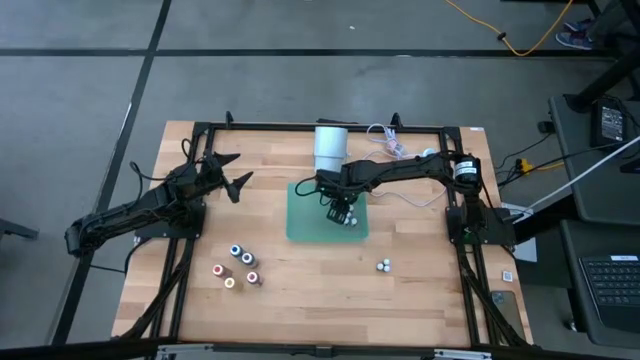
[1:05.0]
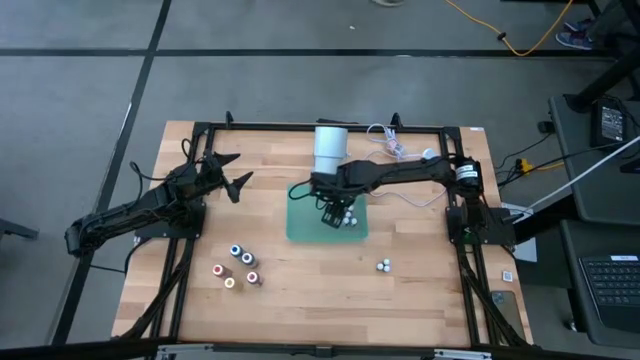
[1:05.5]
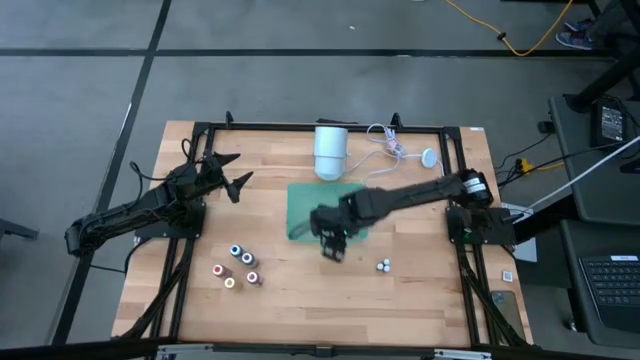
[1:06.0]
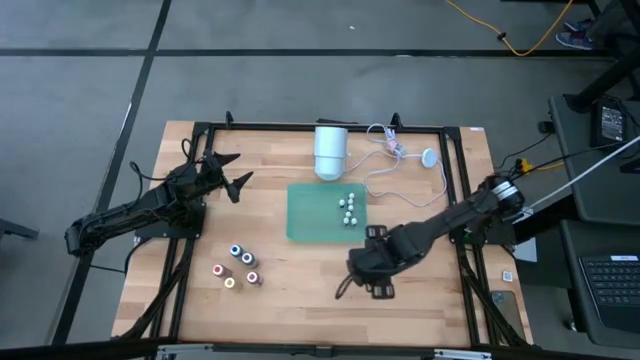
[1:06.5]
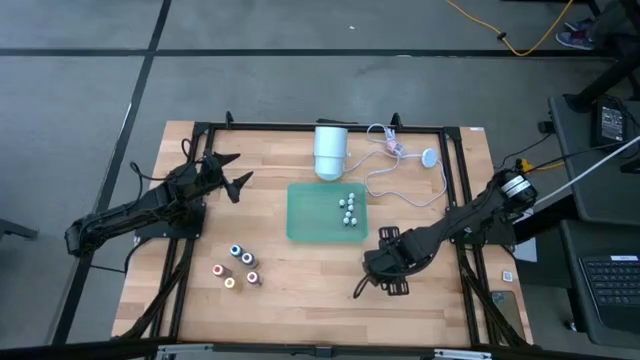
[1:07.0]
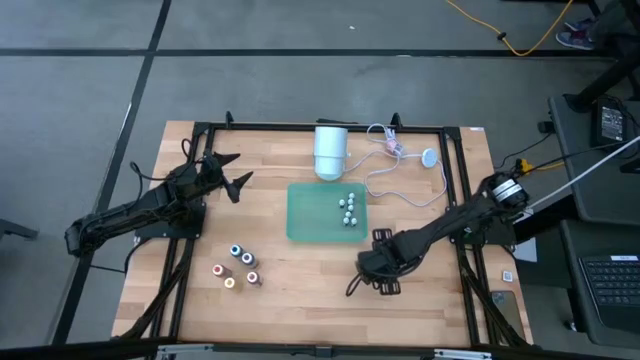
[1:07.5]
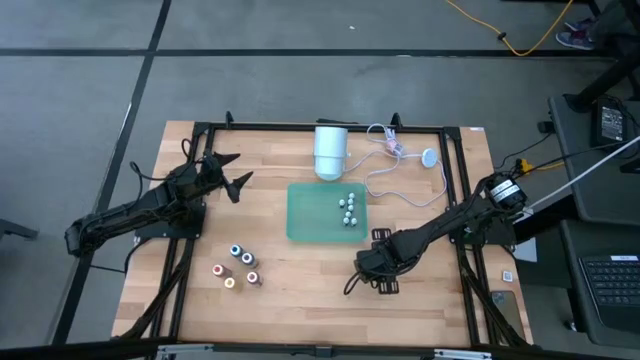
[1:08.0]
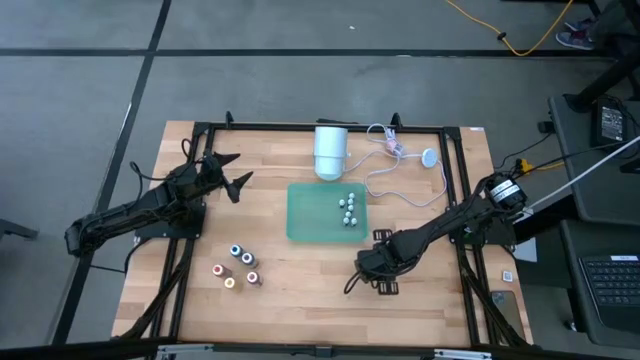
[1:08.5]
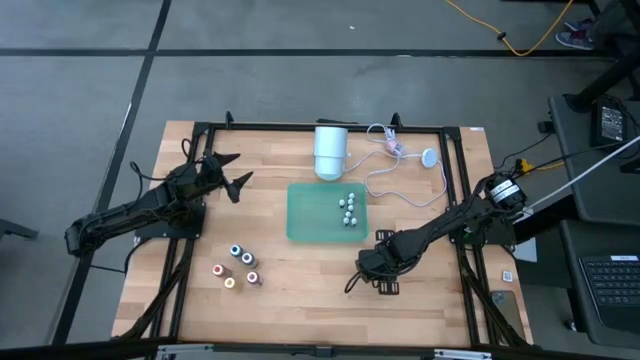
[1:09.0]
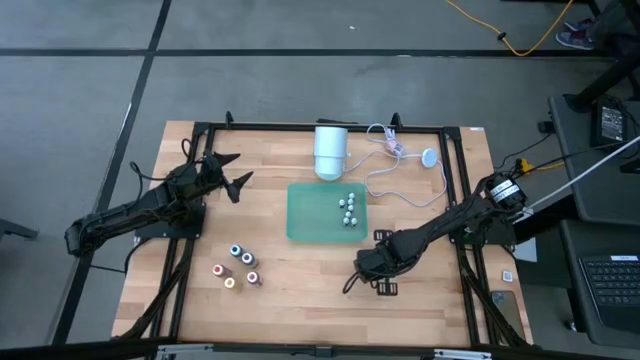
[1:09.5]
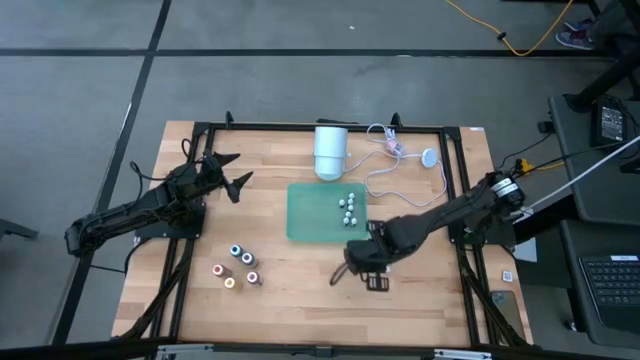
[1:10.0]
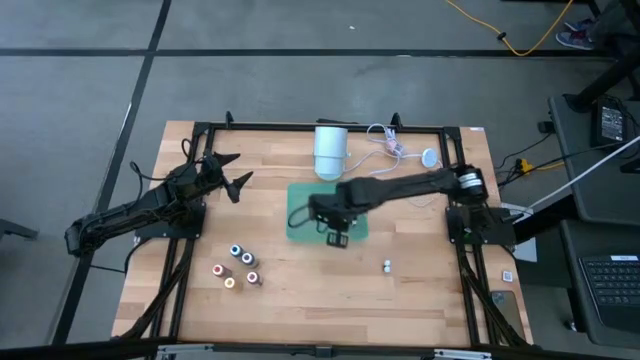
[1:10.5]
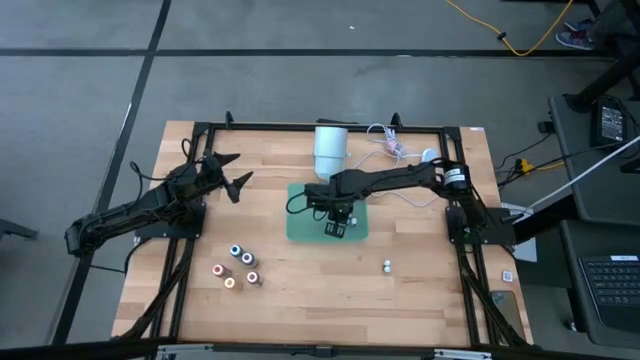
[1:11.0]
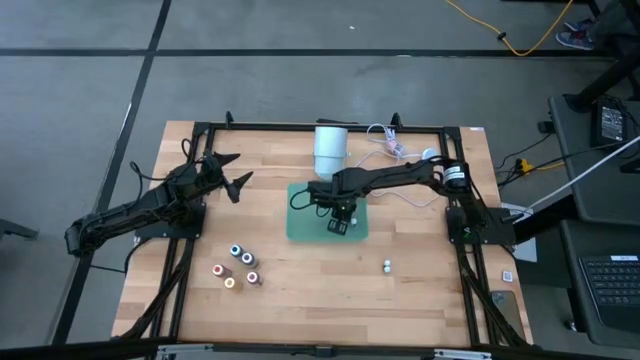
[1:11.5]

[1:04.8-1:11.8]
Task: Pick & Place food coloring
Put the small black food coloring bottle into the green bin

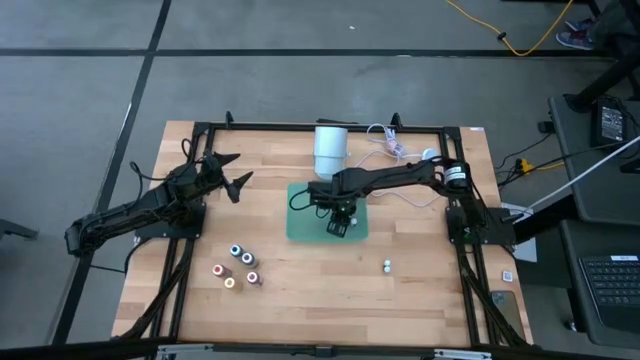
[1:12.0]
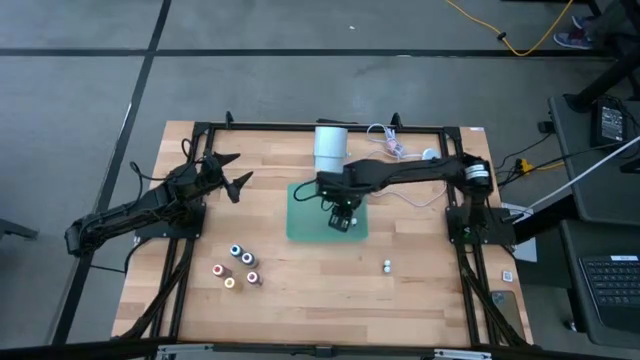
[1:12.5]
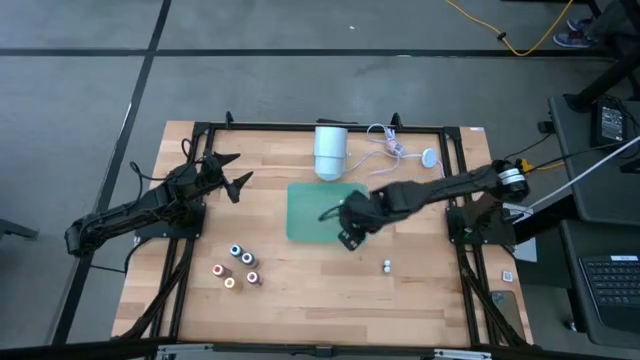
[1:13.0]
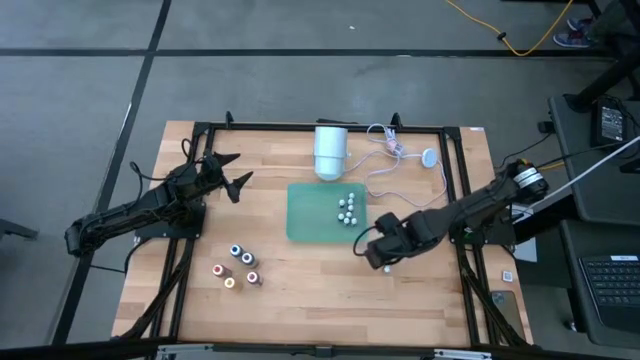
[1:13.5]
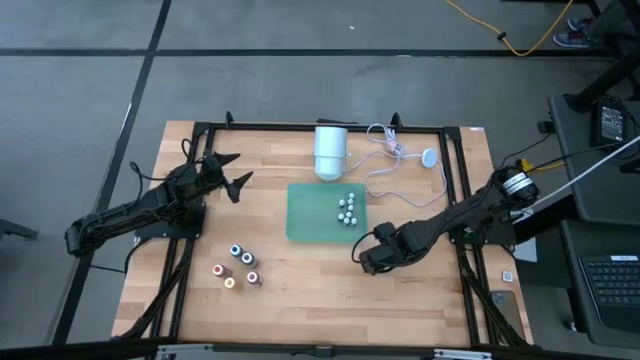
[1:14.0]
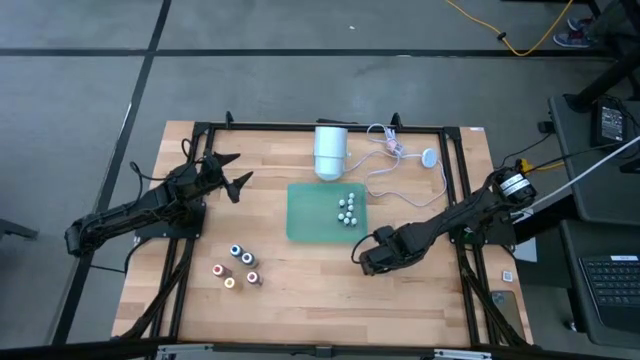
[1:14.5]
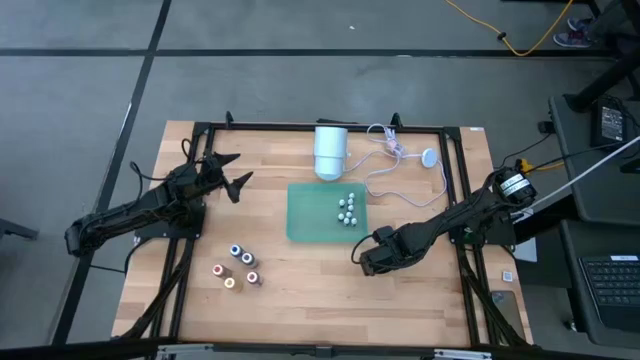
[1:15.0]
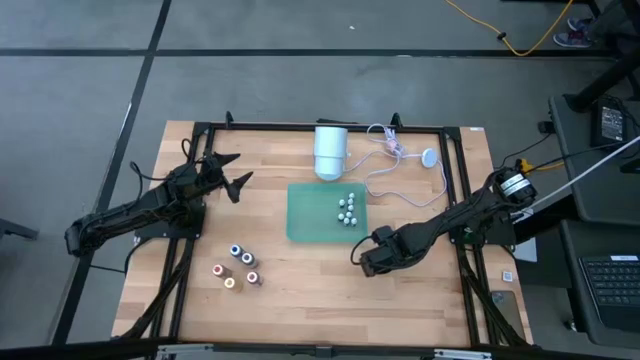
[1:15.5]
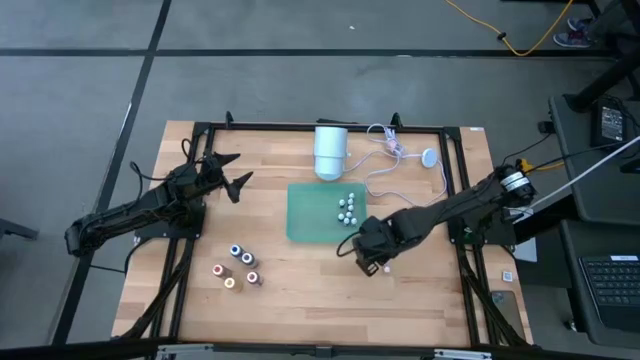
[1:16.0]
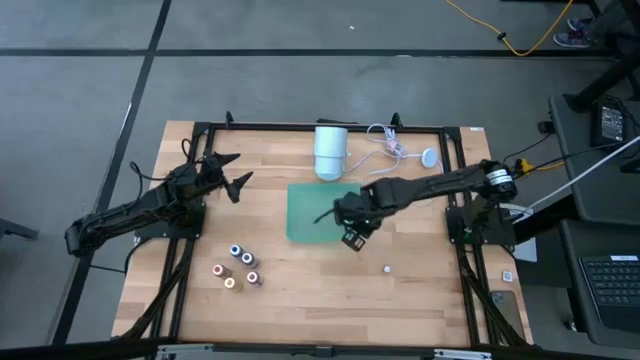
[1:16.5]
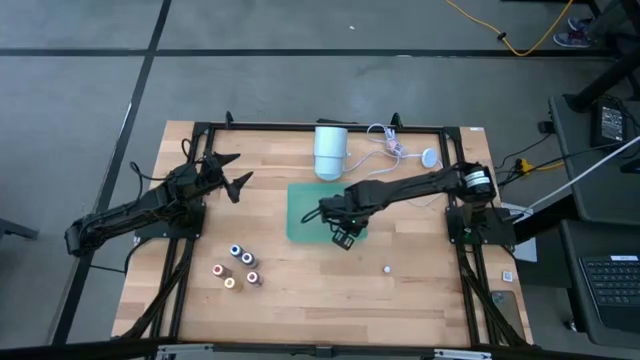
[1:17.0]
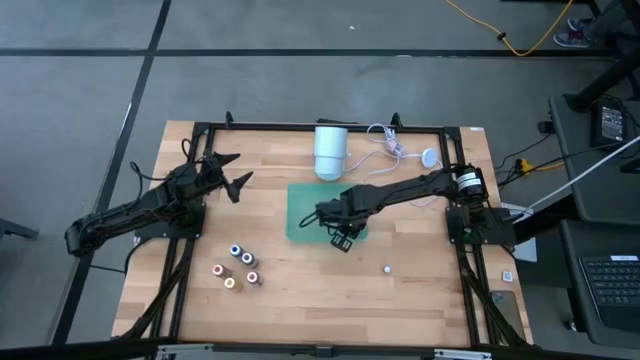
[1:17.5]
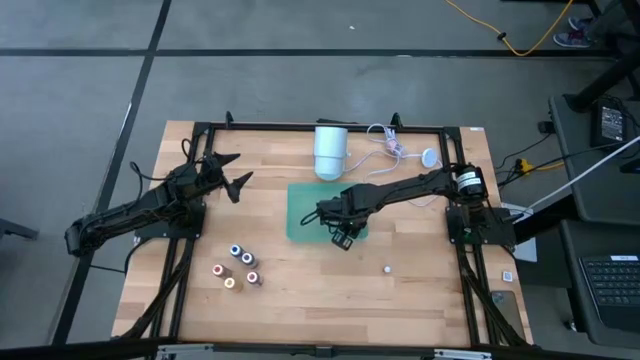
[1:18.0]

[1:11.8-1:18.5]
Put the small pink food coloring bottle into the green bin

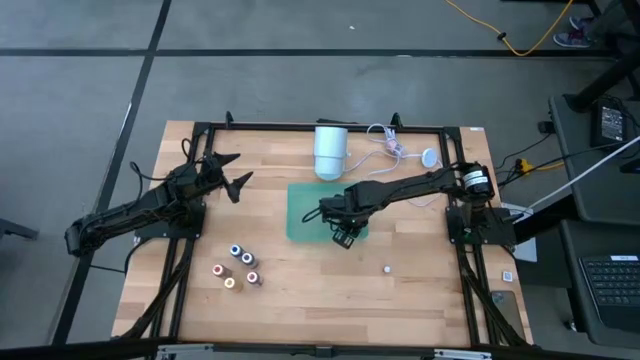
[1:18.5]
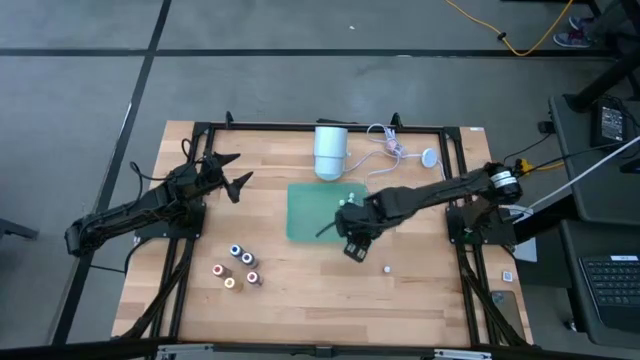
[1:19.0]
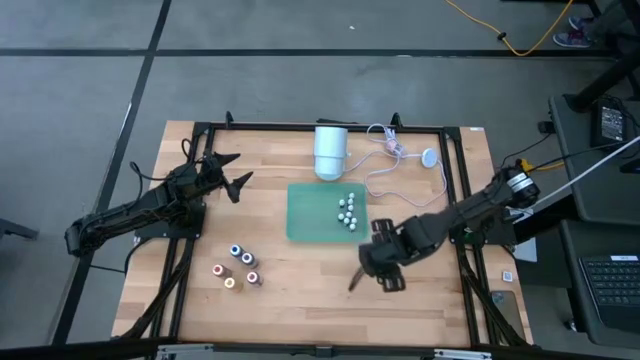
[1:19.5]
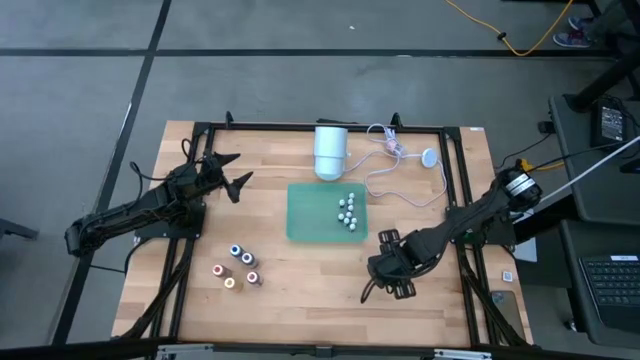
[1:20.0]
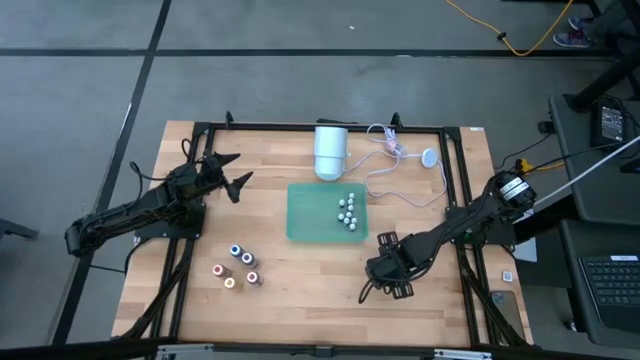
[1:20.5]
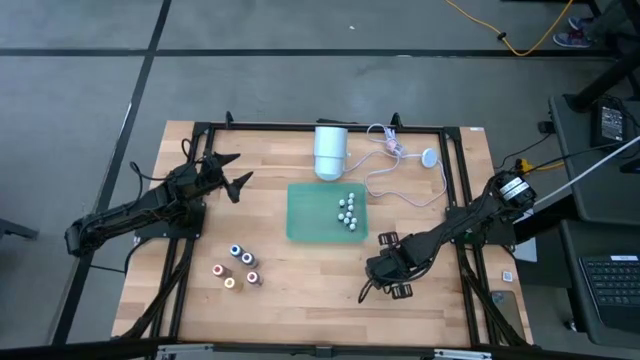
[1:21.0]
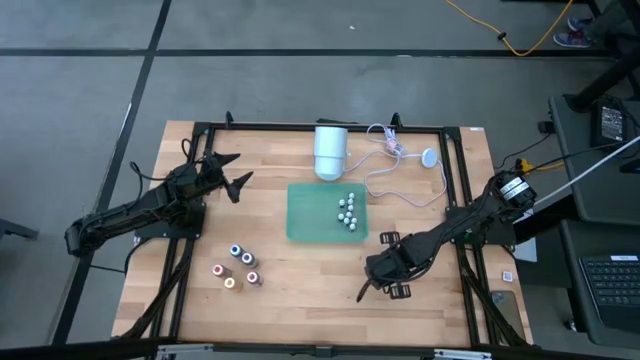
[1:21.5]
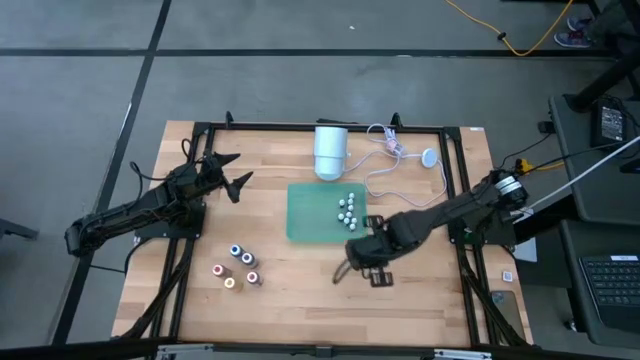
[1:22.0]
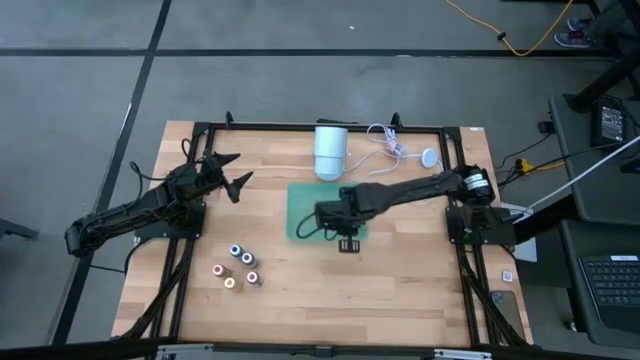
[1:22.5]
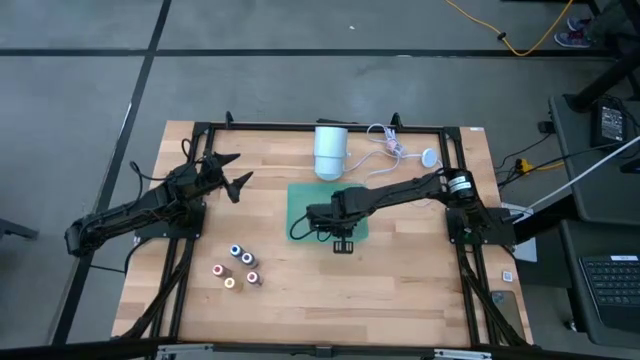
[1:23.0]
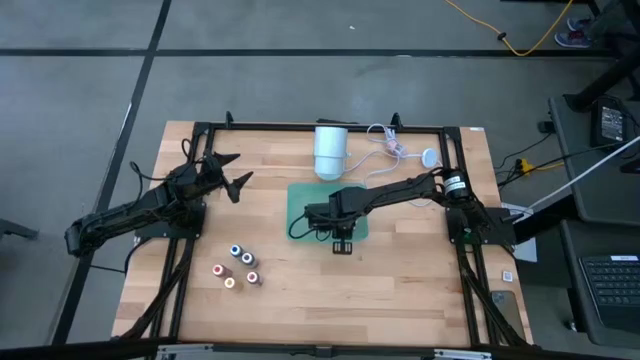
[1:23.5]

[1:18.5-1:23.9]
Put the small red food coloring bottle into the green bin

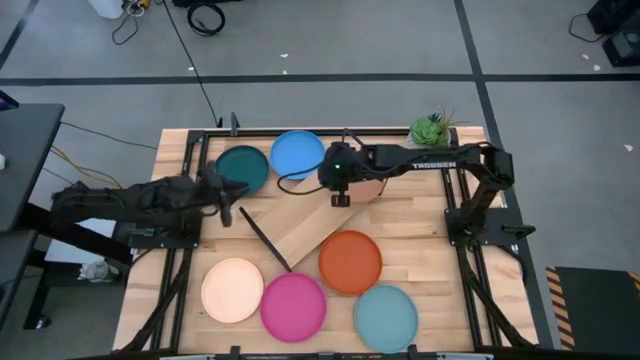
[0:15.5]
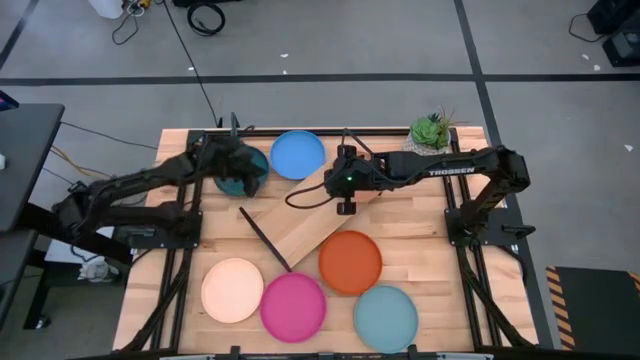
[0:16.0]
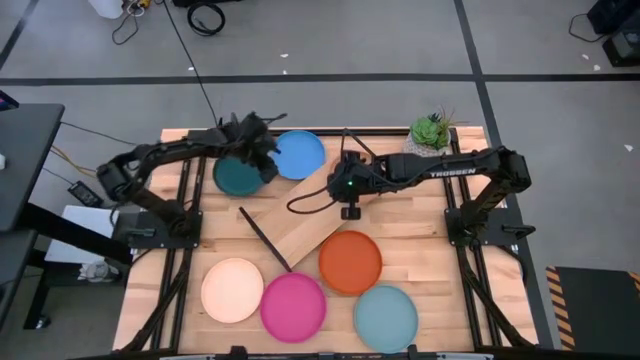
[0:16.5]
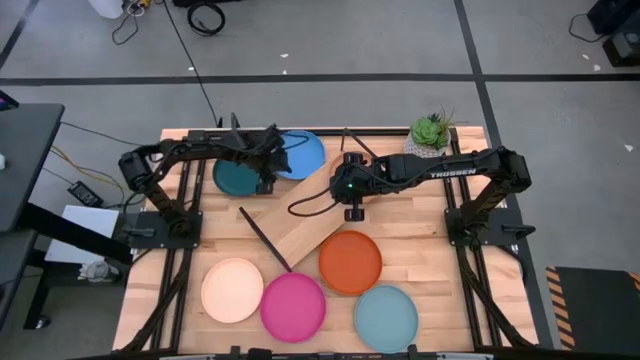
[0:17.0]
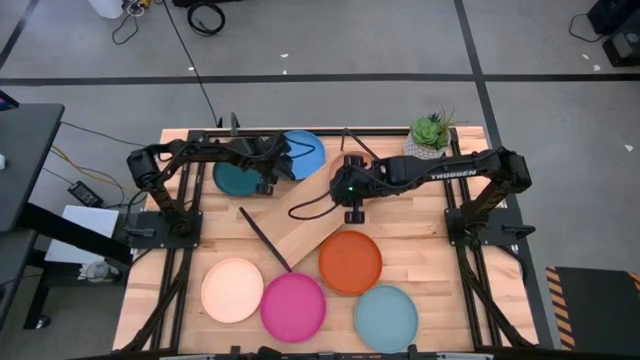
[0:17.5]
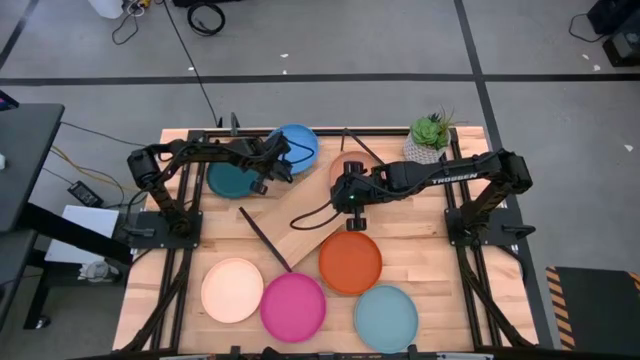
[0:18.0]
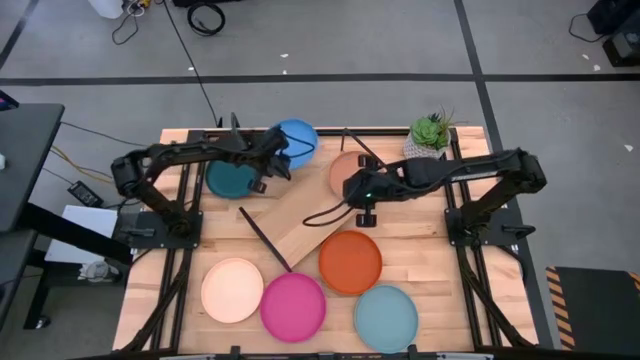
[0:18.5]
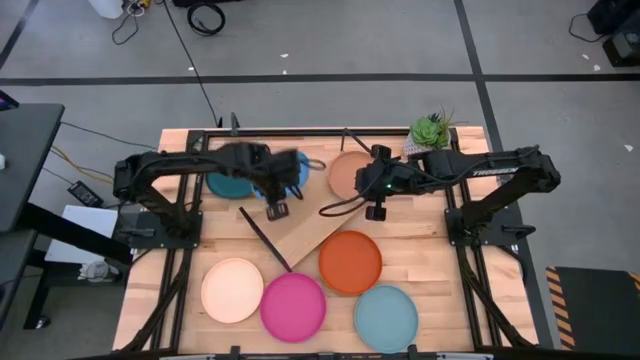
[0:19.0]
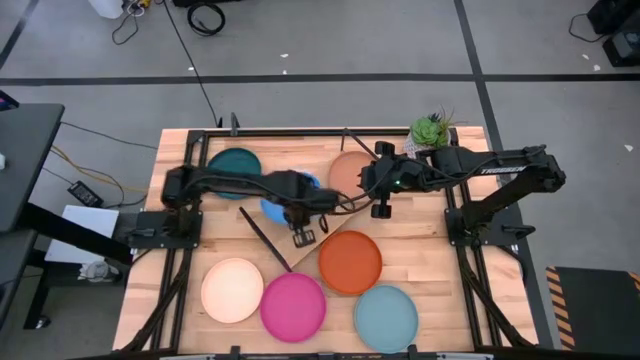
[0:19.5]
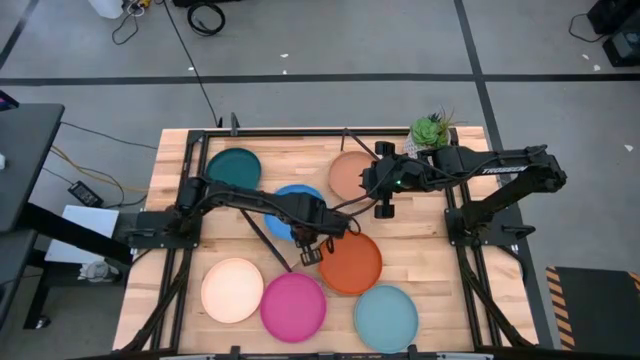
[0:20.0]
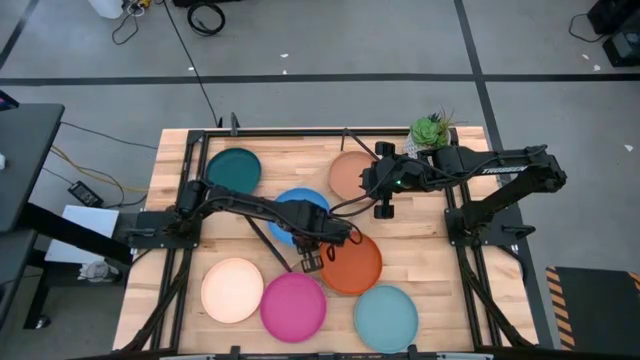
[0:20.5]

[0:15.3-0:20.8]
Task: Place and stack plates onto a shelf
Put the blue plate on the shelf
